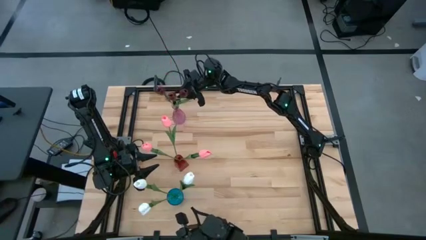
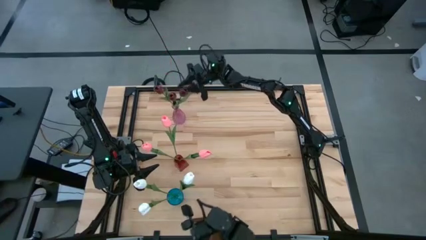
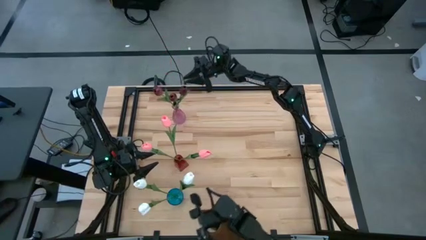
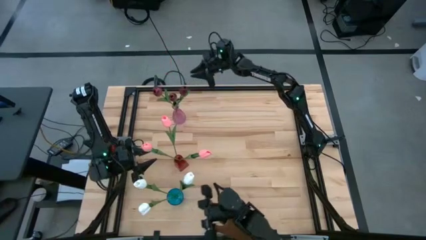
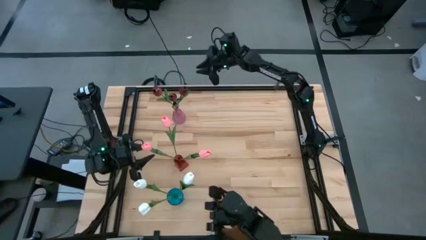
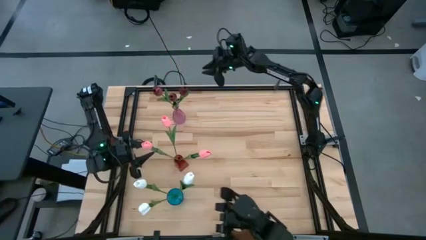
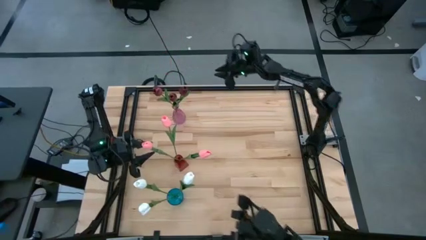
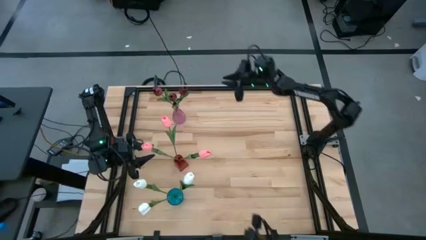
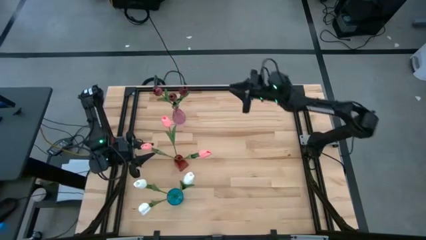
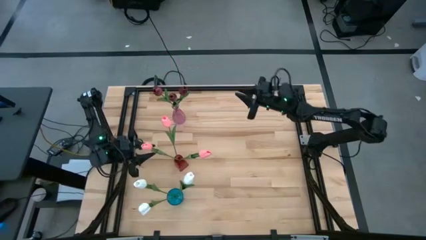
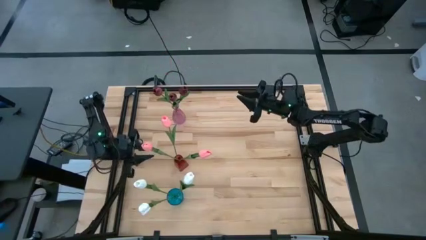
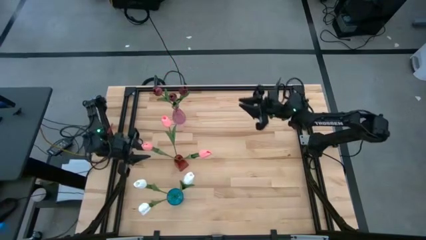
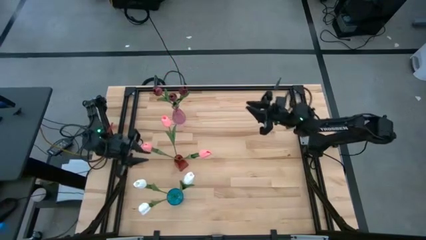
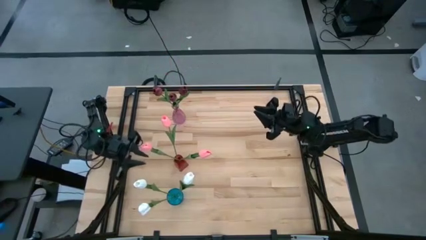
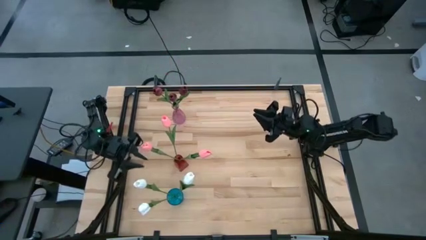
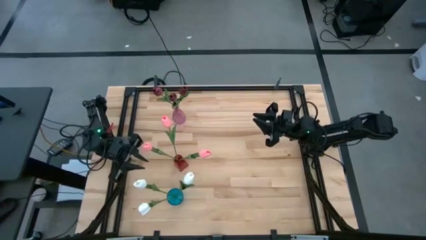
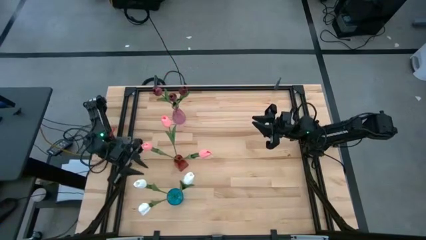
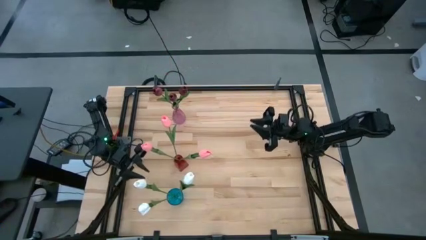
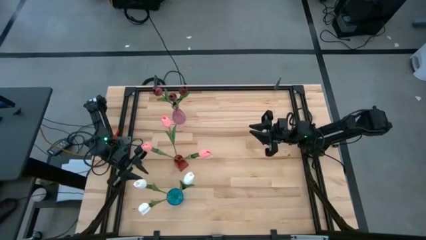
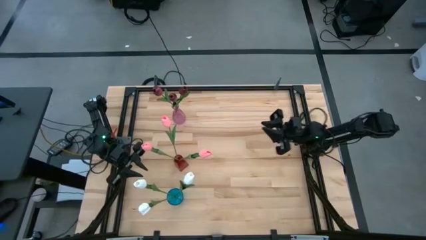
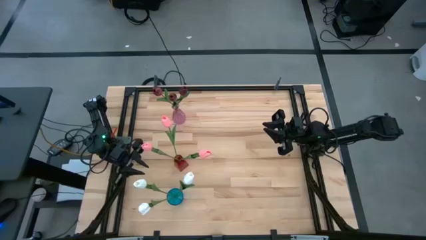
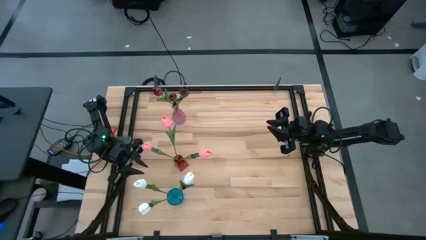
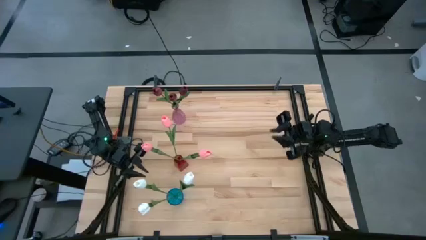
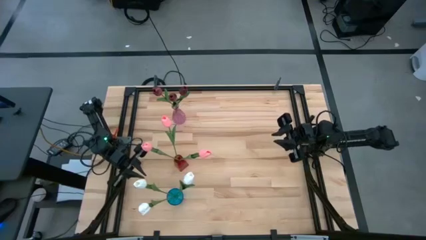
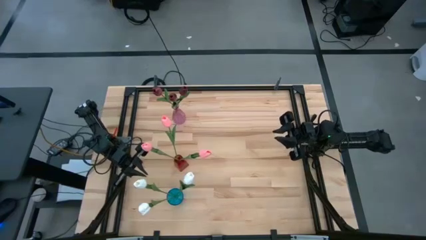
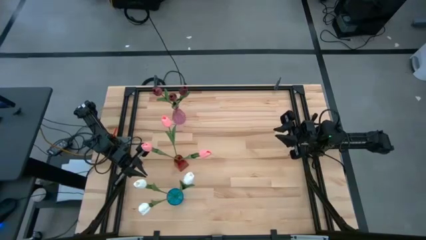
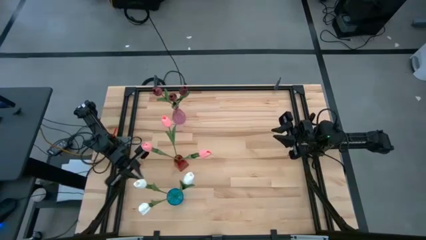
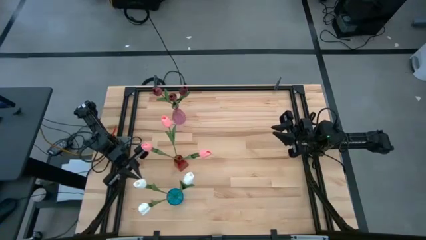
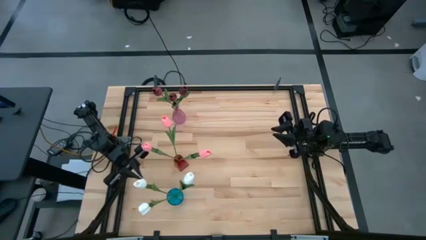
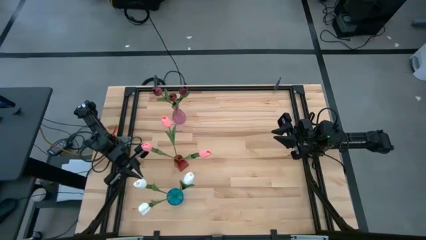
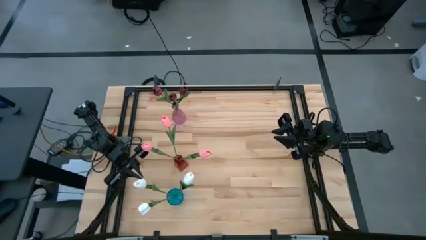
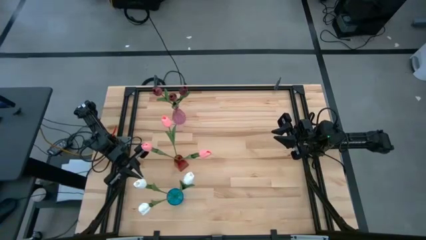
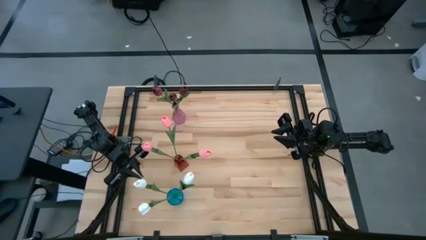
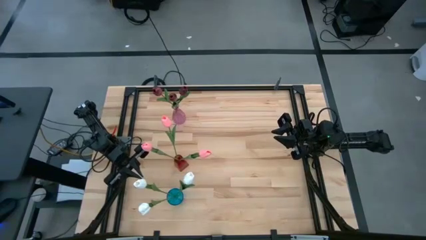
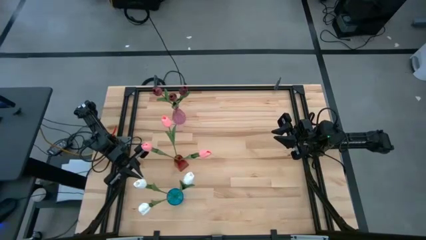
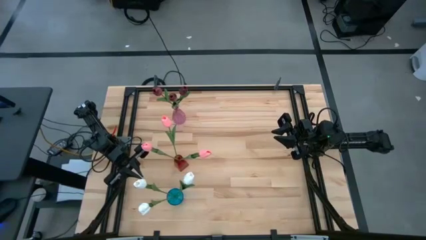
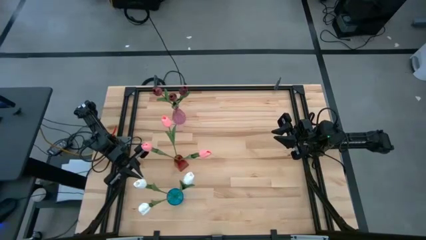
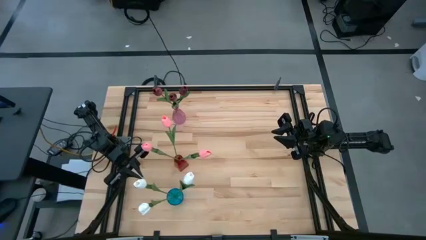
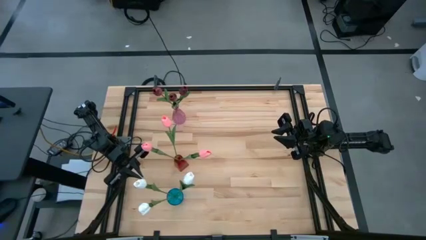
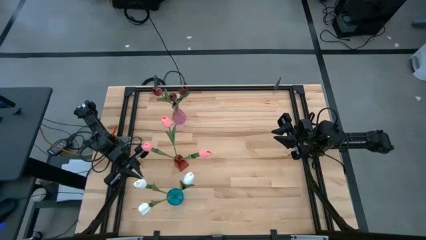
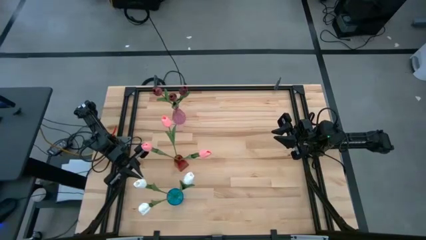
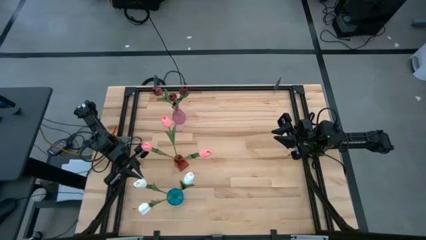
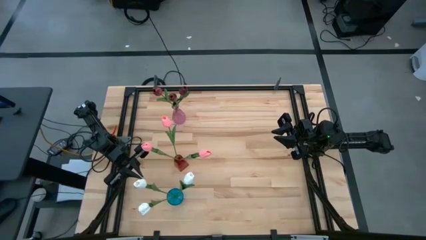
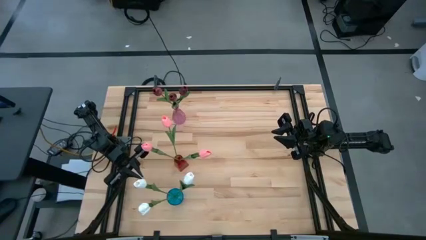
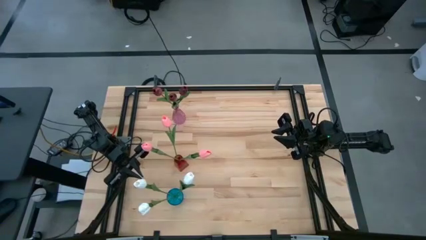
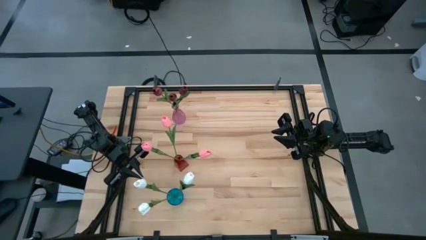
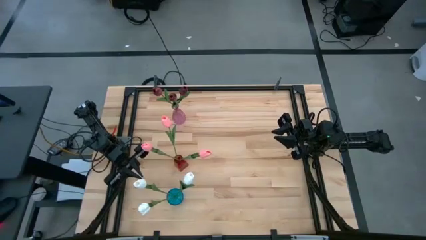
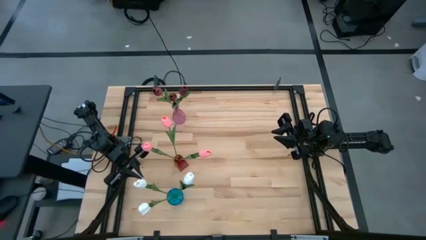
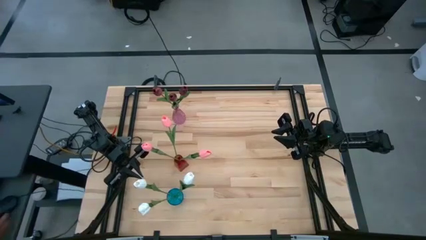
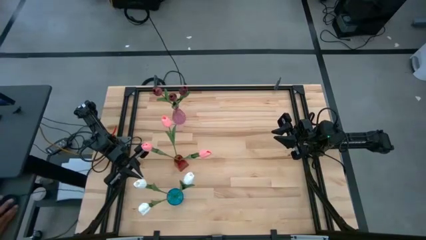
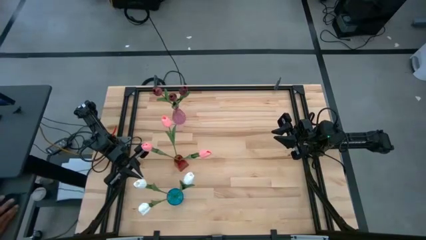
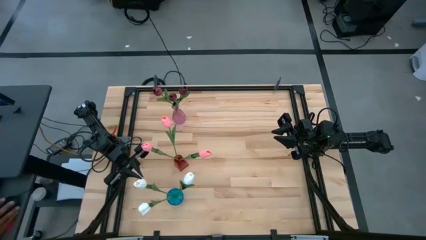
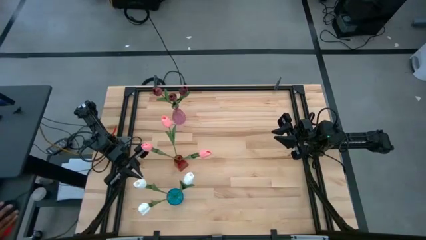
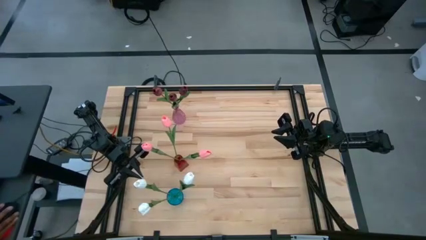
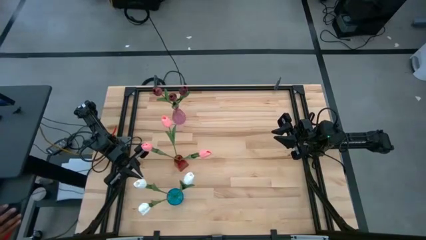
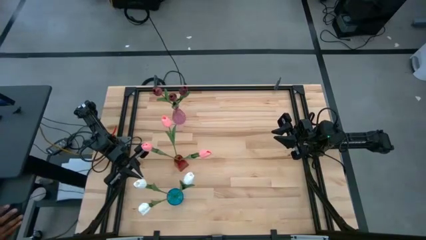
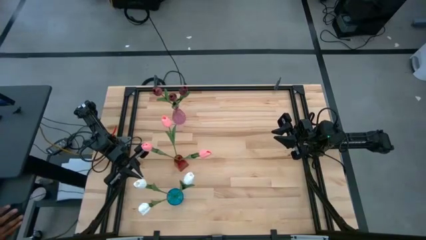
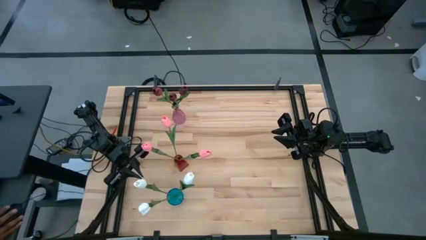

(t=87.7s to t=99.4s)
Task: Sort flowers into vase by color
Return to Home Position

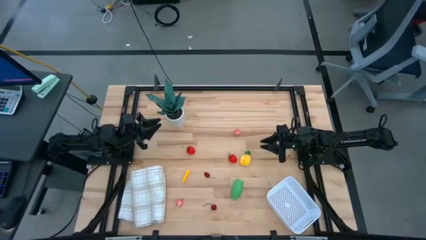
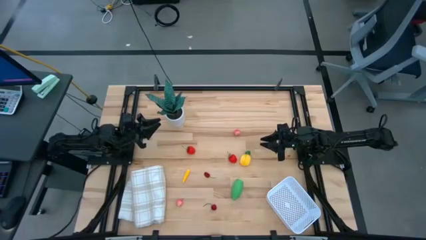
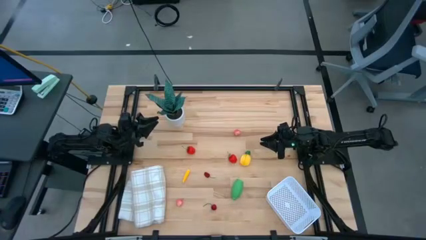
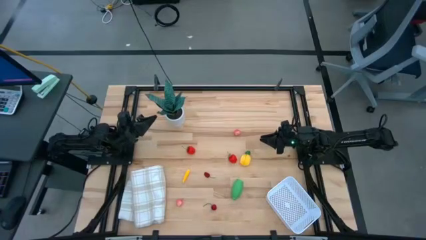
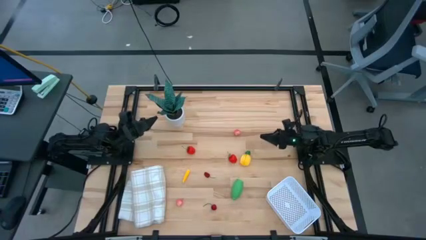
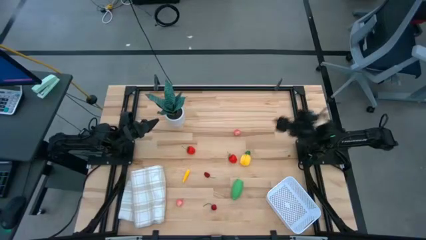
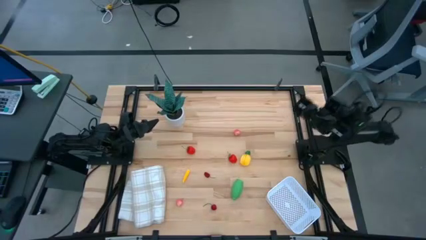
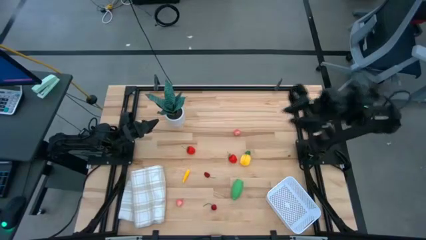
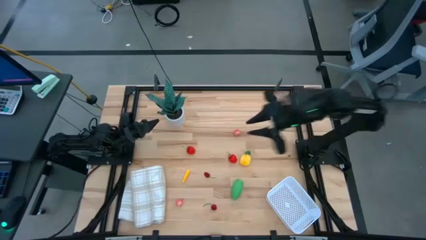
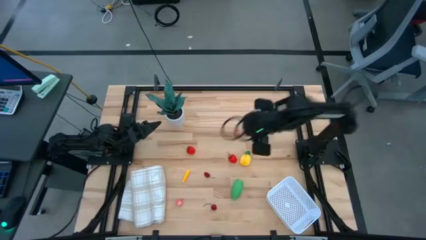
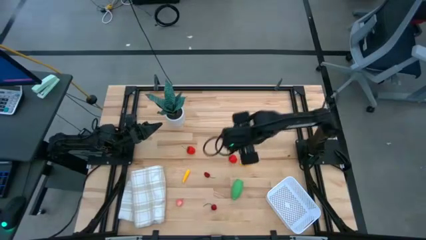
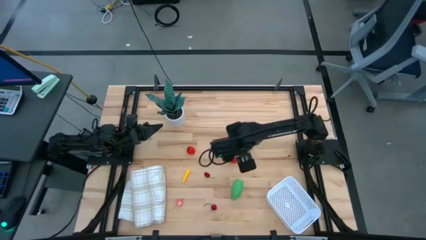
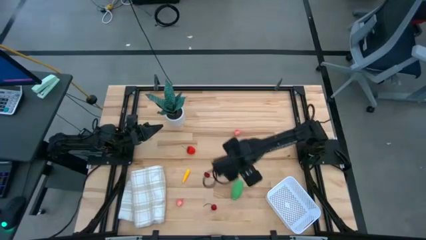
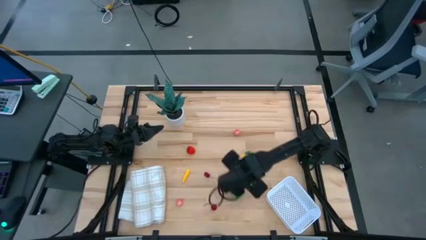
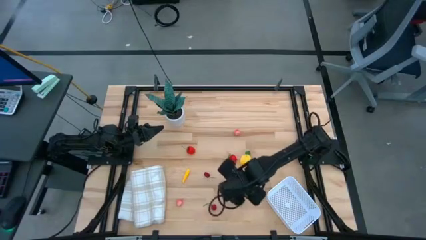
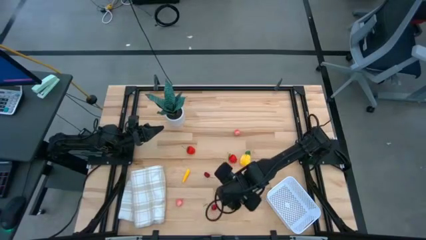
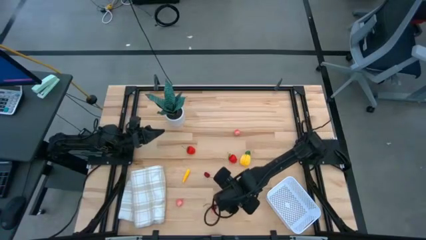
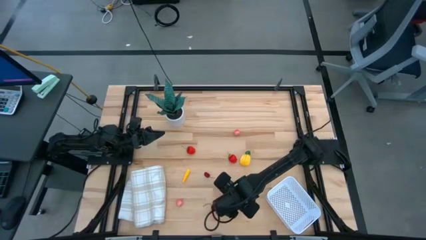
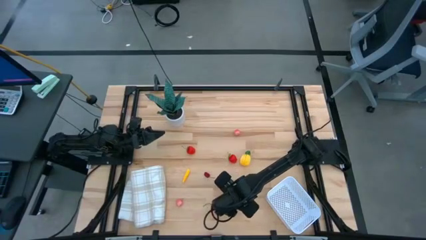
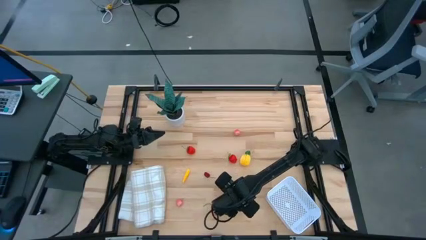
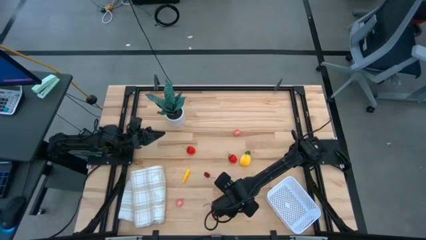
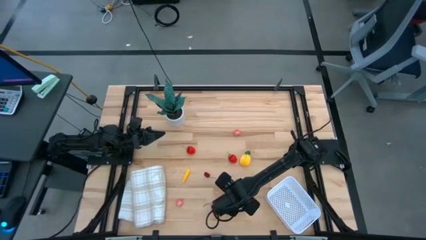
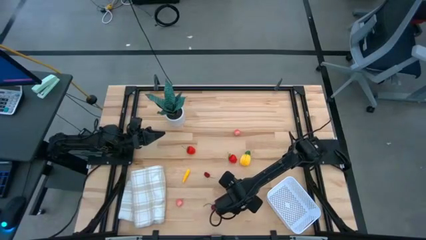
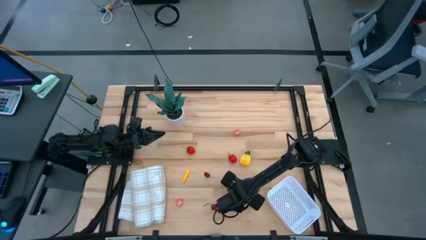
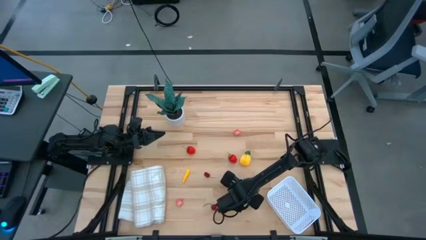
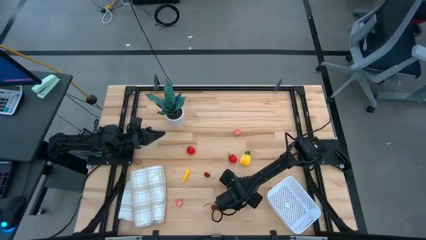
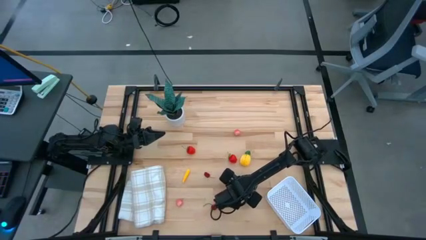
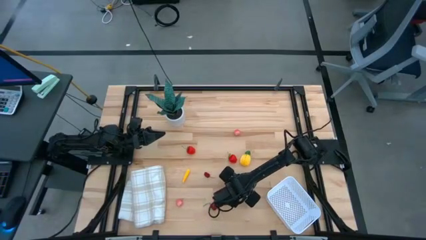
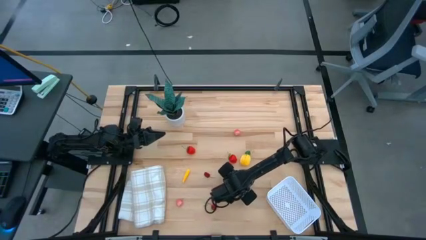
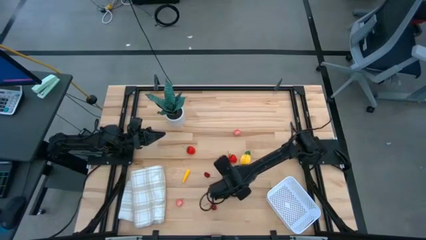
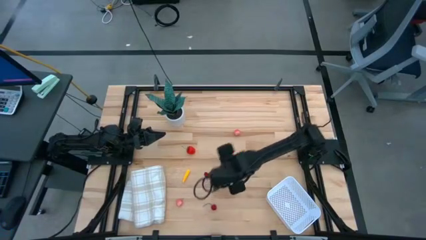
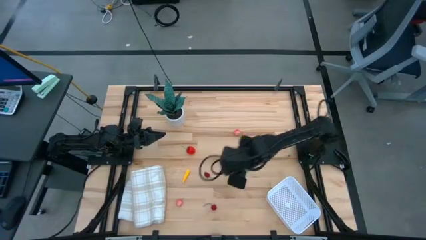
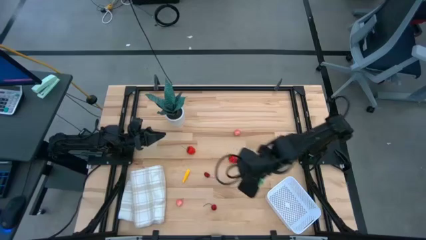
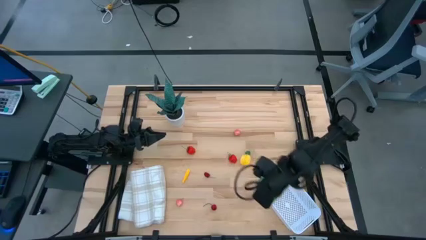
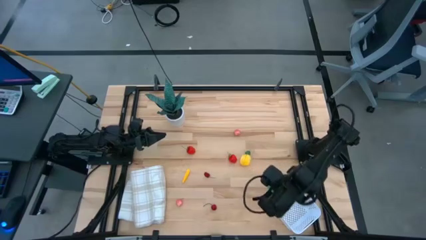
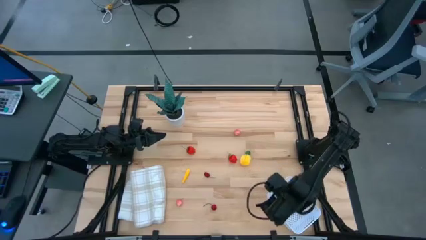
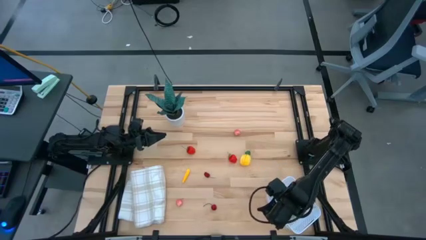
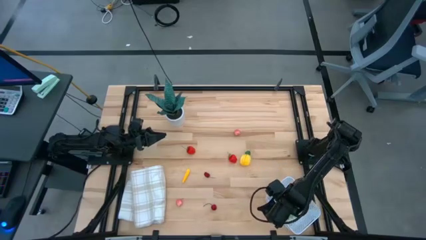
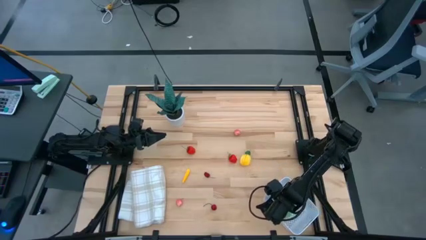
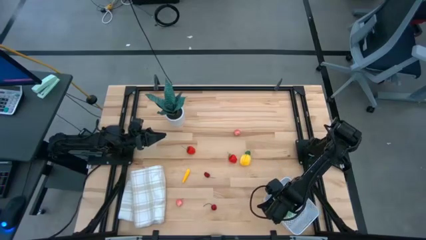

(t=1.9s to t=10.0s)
Task: Pick and placing Produce into tupperware
Put the green corn into the white bin
